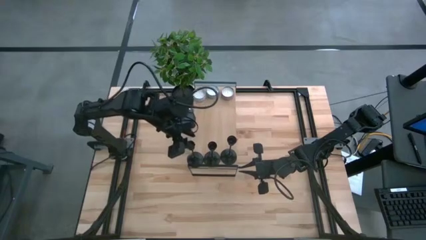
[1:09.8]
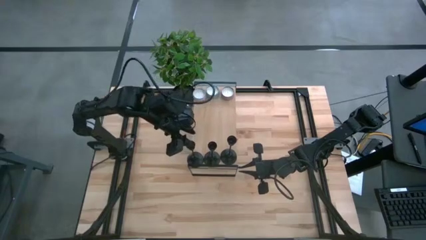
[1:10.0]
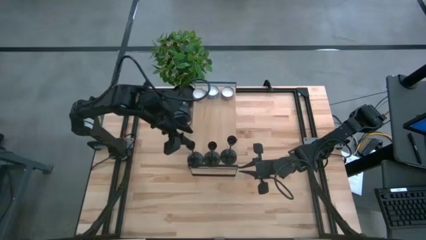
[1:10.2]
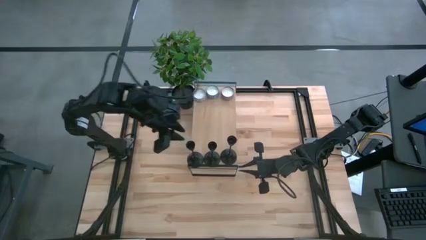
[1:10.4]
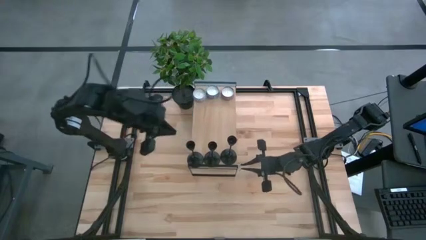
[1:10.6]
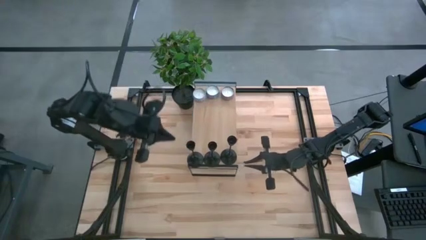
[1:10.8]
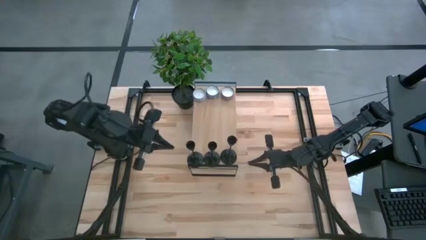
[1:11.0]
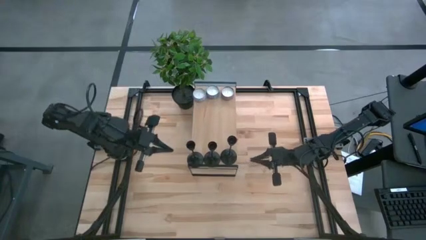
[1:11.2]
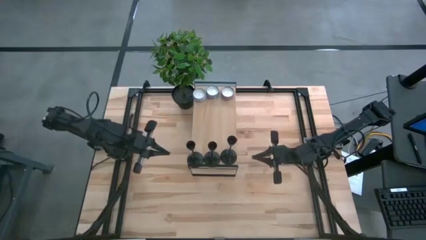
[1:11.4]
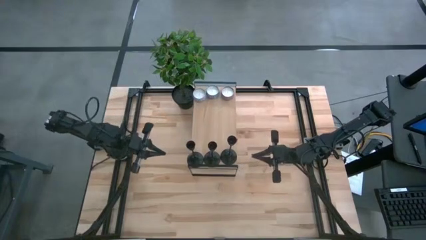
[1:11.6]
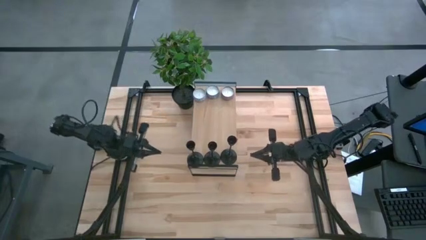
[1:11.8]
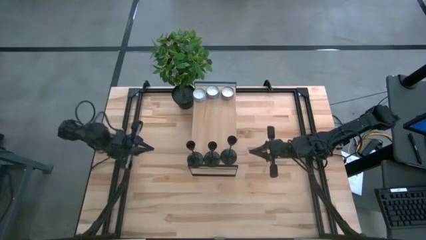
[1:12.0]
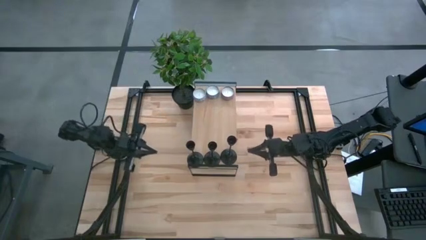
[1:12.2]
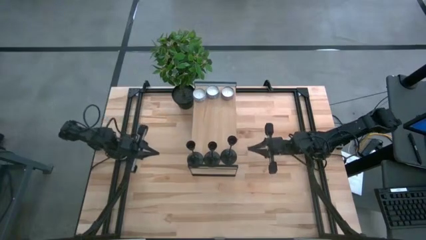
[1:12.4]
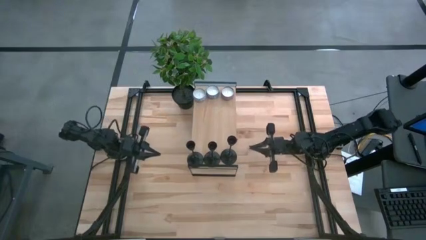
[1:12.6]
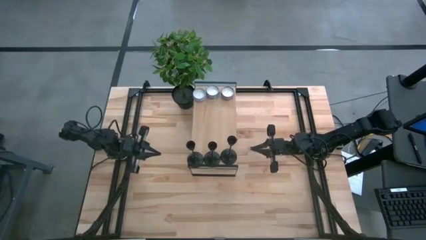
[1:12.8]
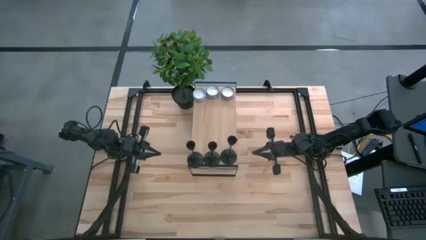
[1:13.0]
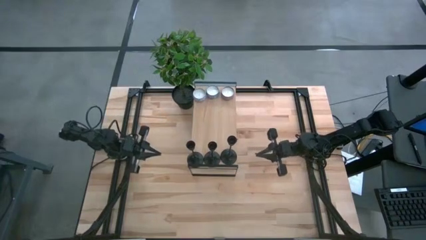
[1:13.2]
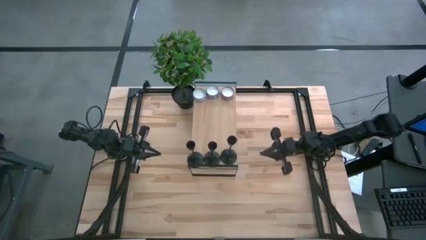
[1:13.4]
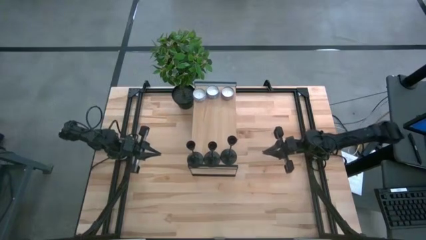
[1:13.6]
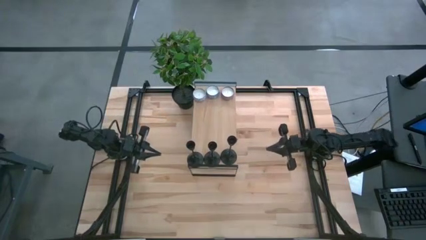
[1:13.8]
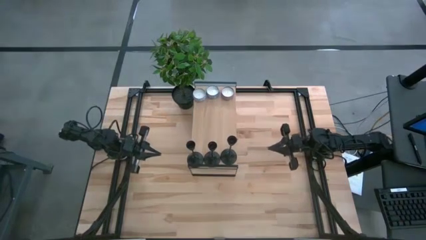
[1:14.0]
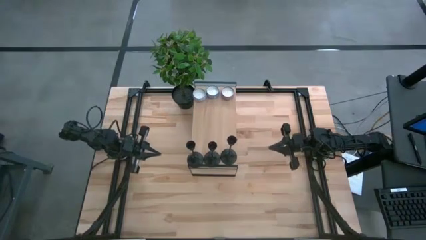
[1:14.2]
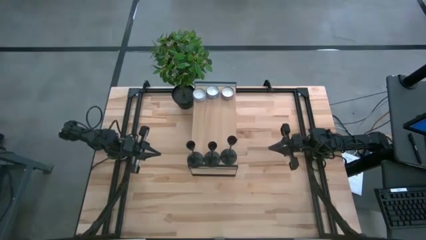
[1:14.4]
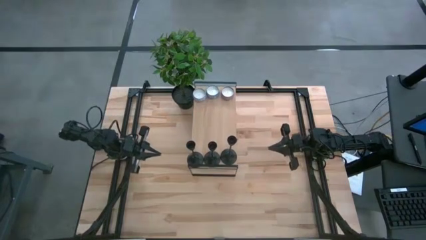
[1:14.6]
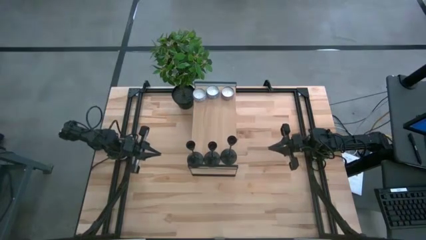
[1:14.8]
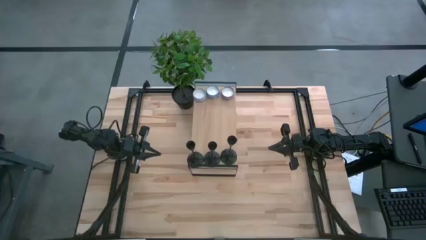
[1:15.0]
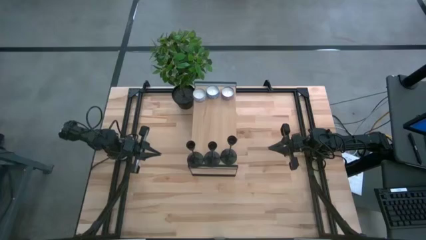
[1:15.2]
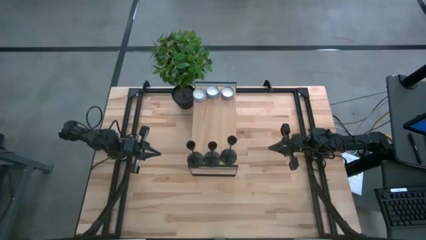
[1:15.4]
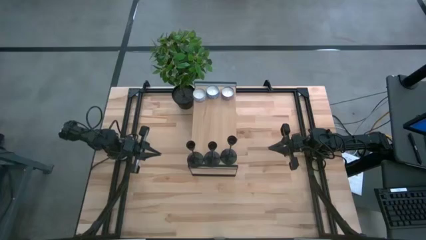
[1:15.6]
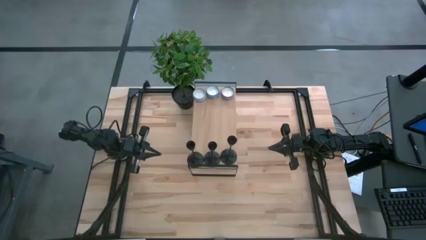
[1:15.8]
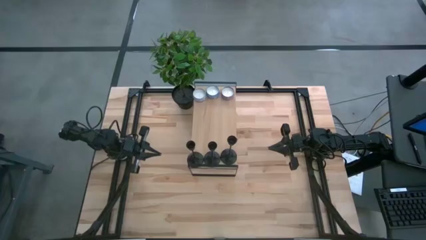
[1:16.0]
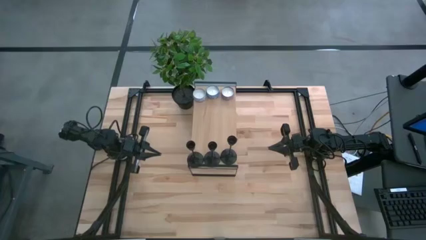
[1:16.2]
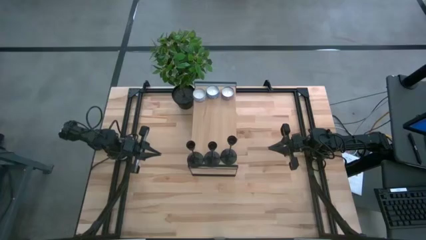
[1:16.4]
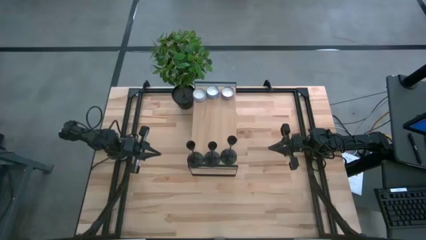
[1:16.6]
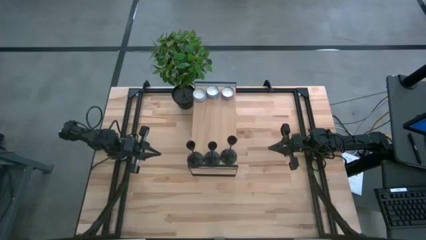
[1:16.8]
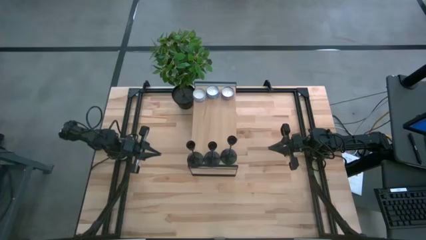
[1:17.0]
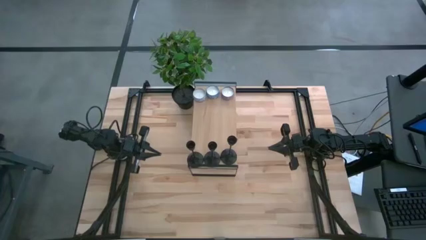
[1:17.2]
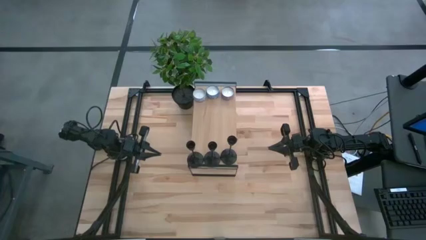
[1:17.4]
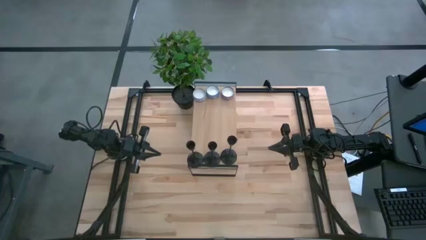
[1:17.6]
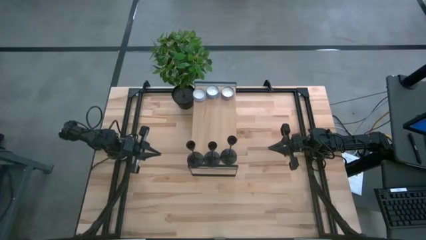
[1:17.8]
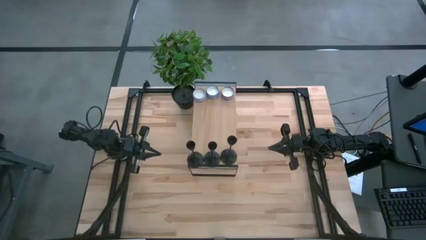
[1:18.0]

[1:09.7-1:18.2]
Task: Pick & Place candle stick holders
Return to Home Position

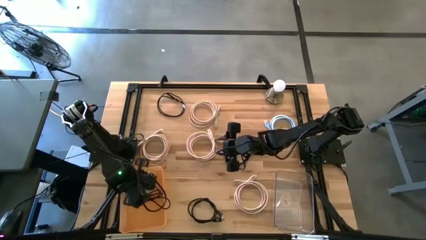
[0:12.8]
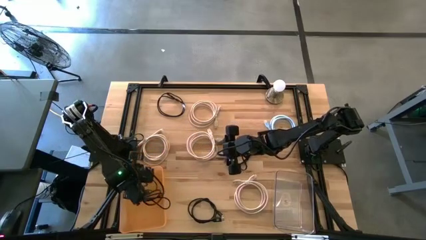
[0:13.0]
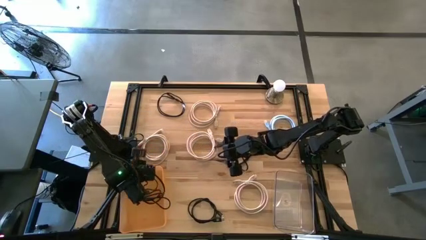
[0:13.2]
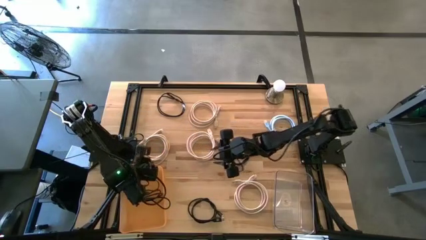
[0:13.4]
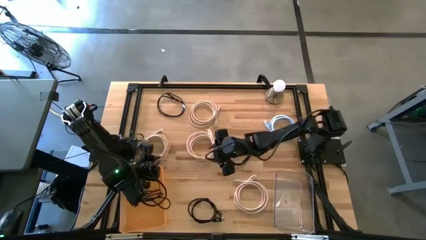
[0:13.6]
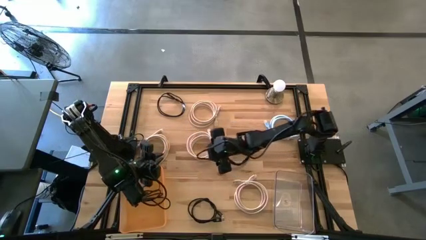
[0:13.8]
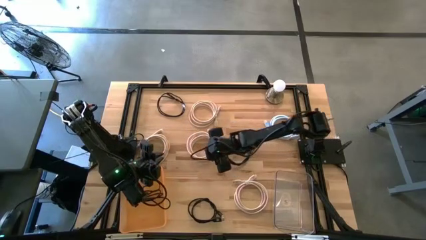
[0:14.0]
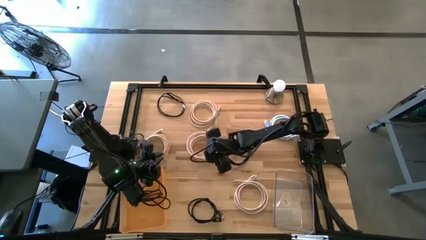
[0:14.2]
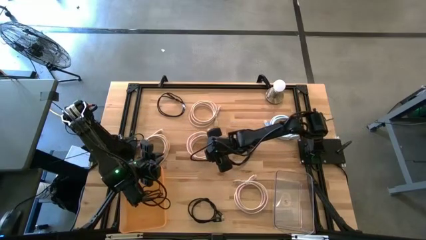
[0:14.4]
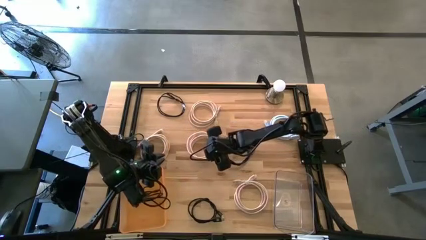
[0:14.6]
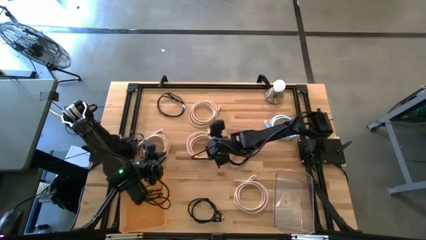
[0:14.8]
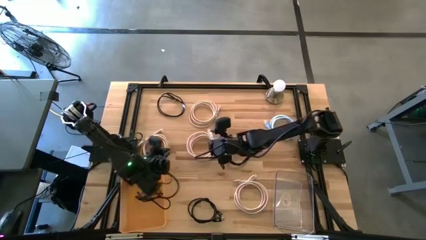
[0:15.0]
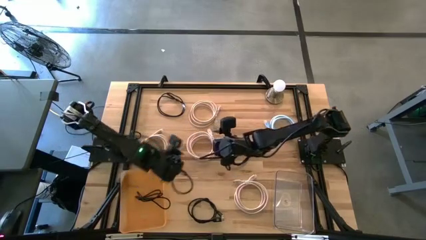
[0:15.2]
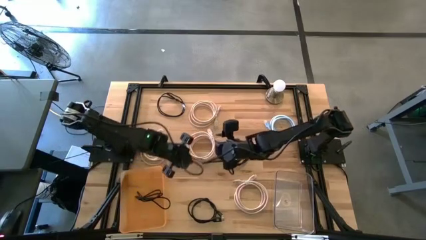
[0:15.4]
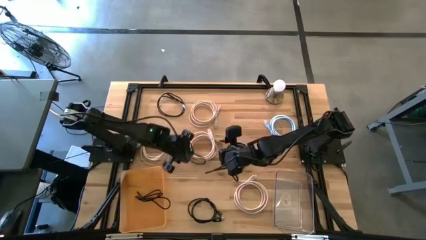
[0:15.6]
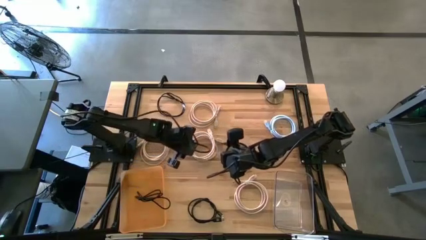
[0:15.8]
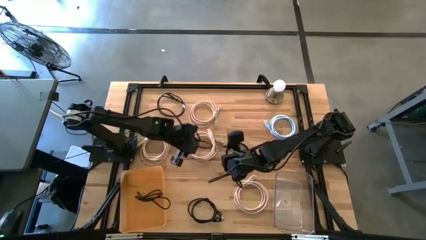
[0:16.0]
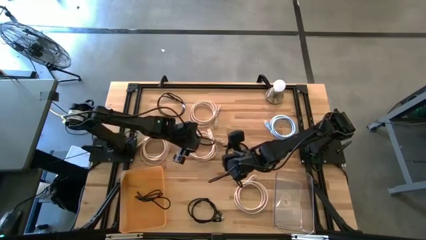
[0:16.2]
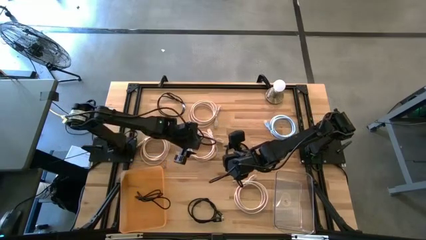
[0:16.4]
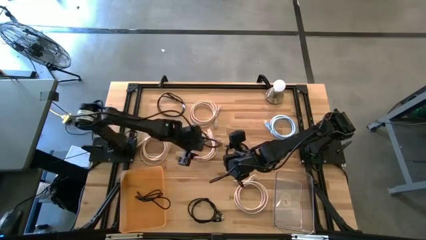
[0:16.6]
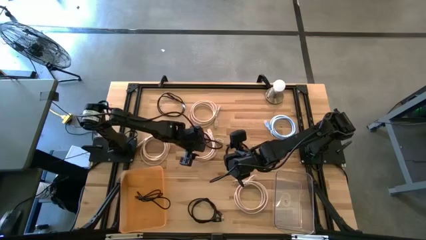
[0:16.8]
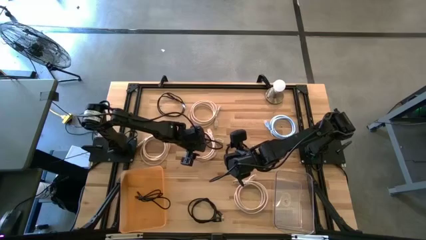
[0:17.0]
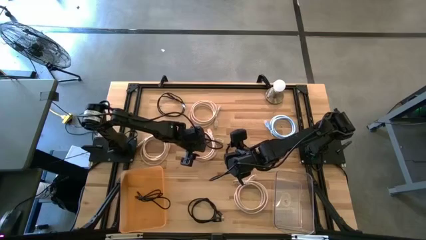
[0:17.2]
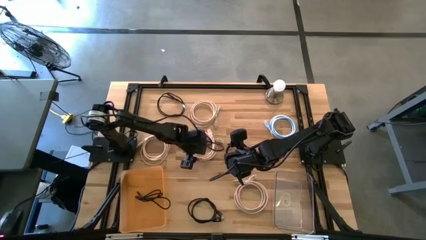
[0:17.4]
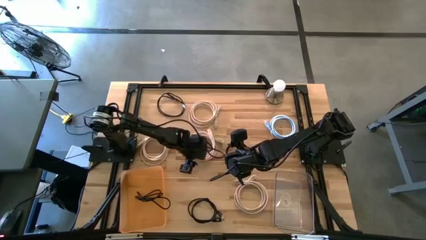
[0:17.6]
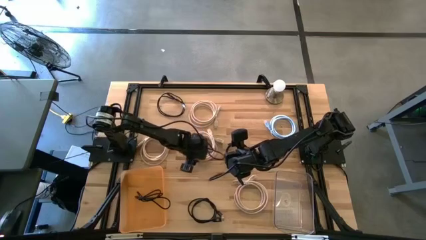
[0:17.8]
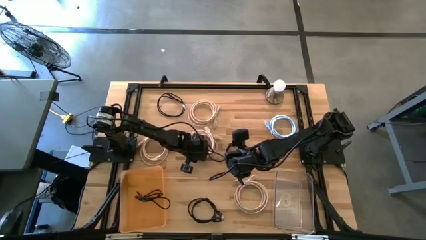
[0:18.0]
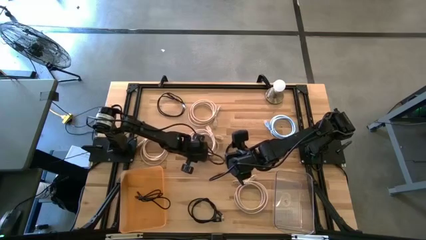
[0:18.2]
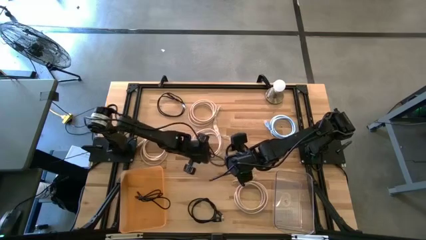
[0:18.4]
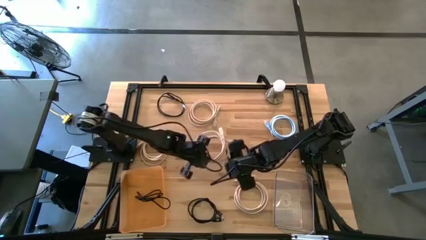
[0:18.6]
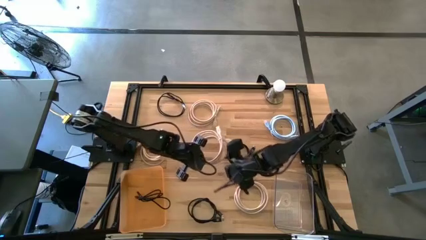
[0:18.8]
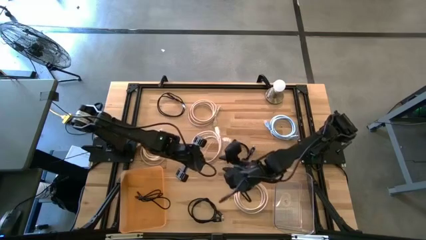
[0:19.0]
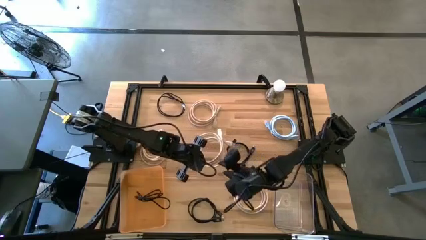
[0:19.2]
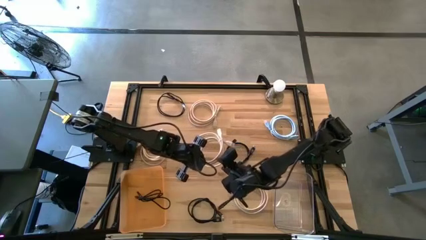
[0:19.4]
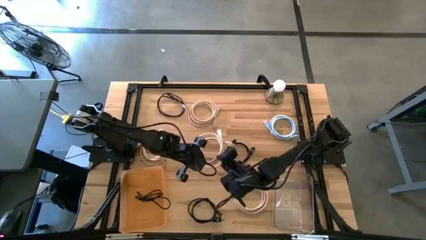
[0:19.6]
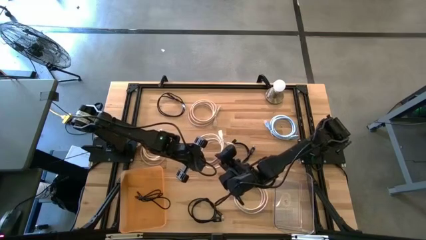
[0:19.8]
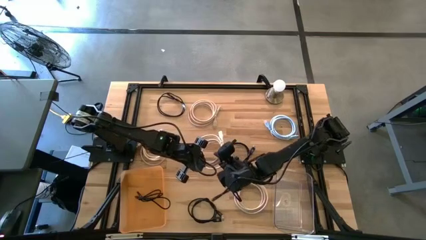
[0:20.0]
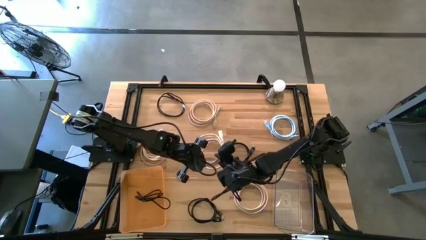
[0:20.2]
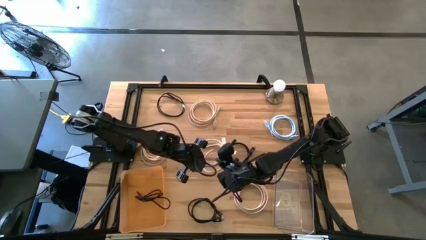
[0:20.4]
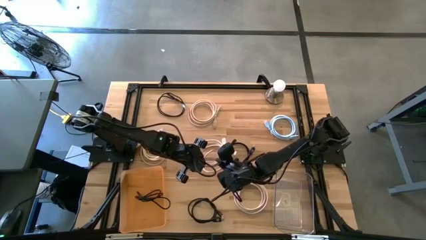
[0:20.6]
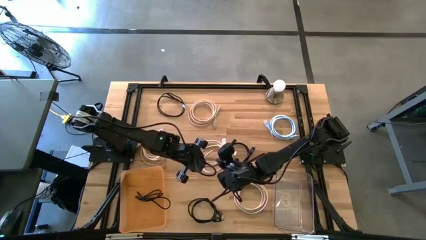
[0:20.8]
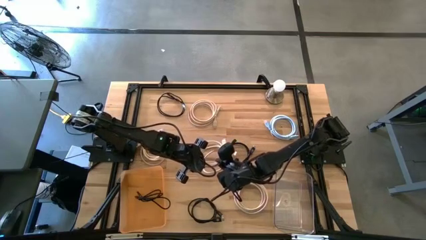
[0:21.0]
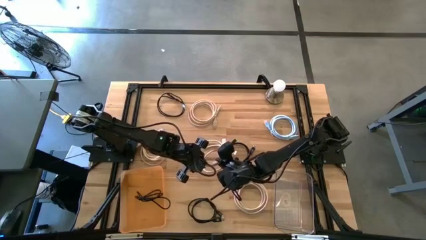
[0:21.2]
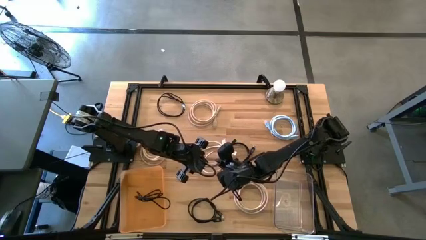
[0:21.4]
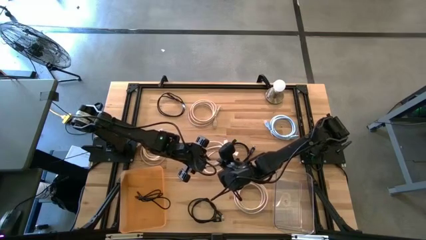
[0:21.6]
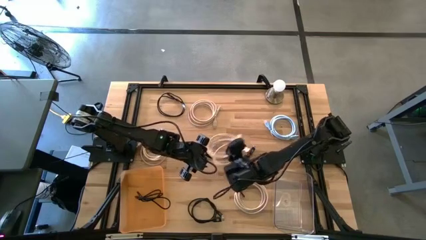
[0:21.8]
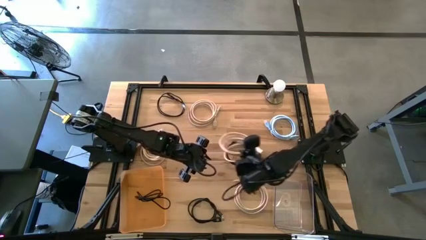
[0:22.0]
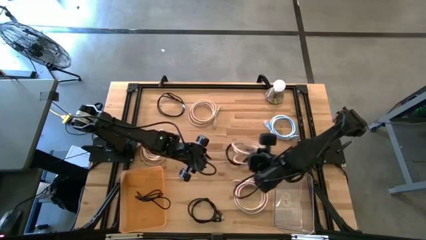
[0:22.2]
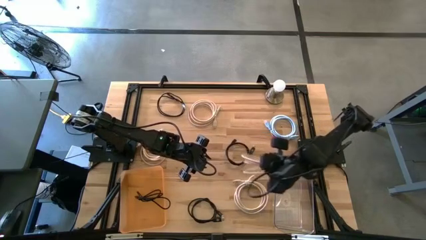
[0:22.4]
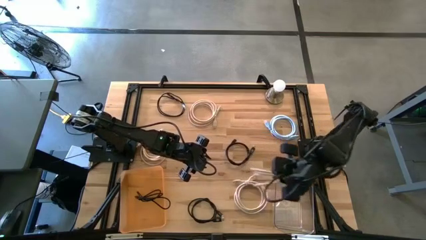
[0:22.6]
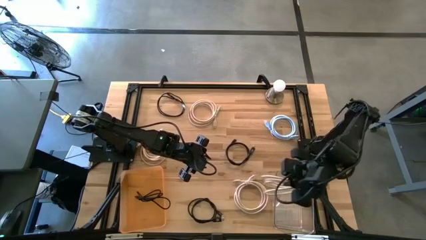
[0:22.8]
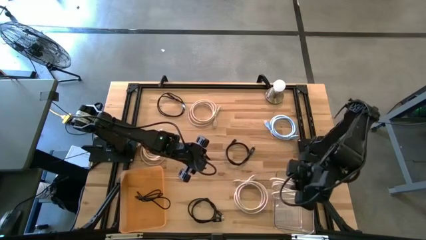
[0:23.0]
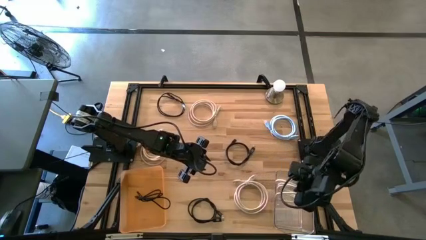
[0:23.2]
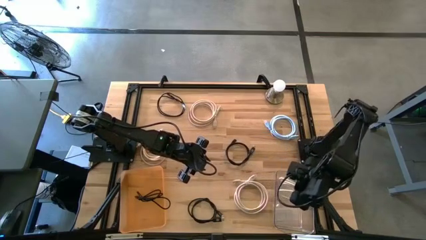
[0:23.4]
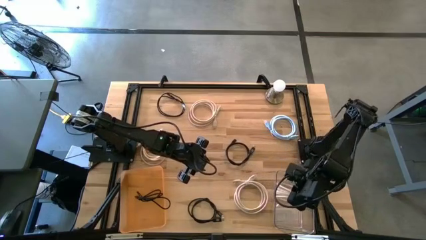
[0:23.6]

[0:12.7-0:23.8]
Task: Sort HDMI cables
Put the white HDMI cable into the transparent bin
